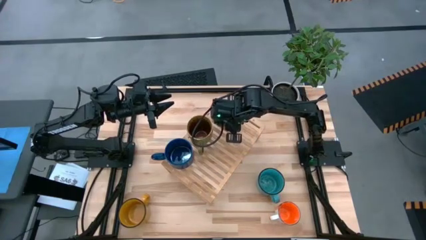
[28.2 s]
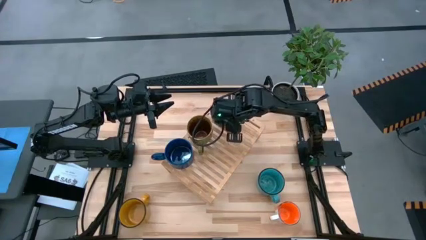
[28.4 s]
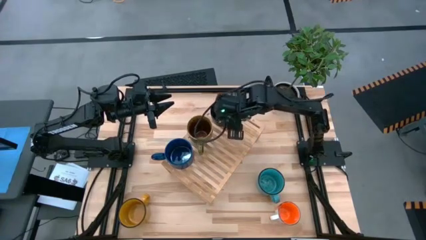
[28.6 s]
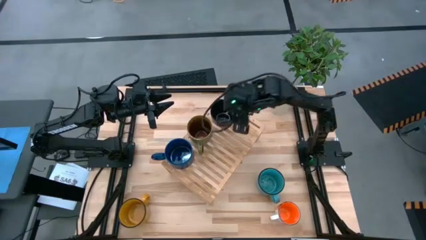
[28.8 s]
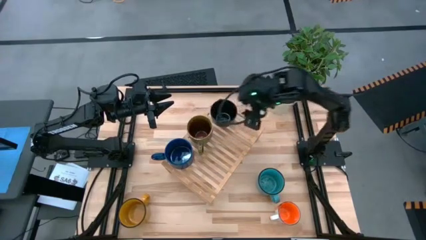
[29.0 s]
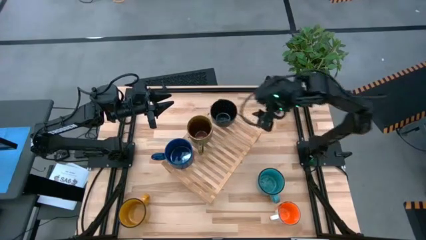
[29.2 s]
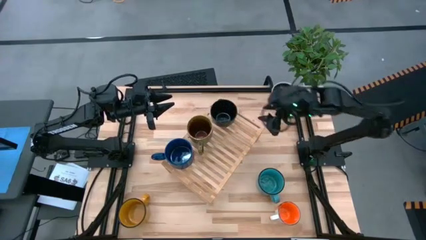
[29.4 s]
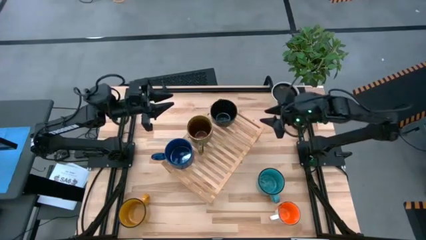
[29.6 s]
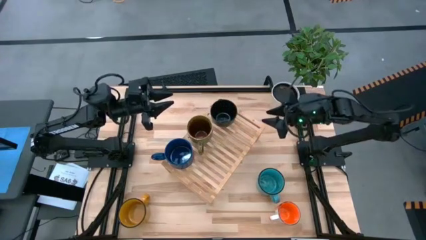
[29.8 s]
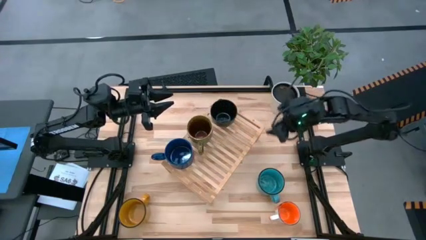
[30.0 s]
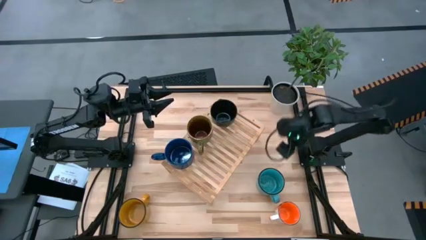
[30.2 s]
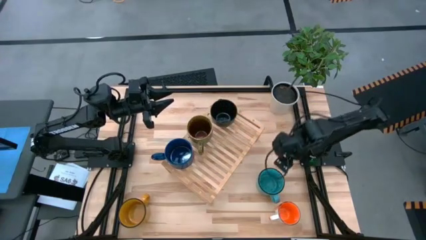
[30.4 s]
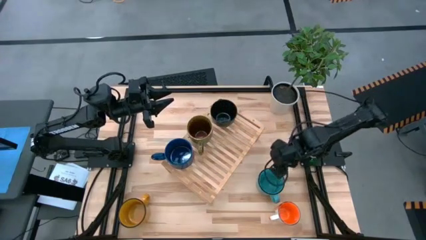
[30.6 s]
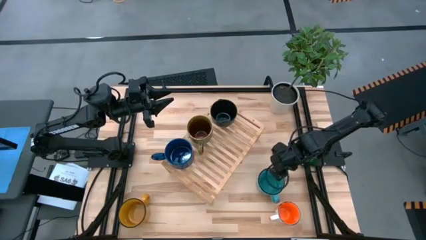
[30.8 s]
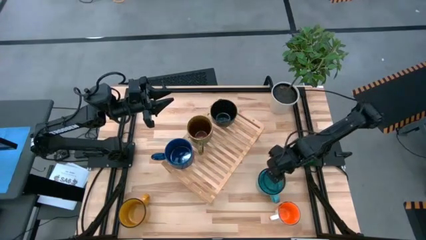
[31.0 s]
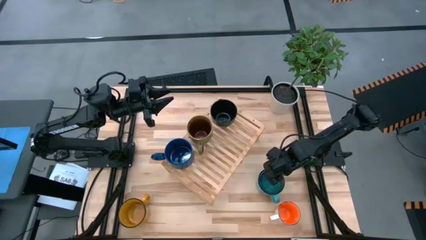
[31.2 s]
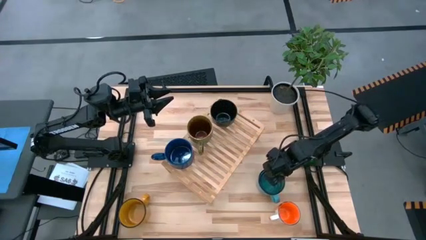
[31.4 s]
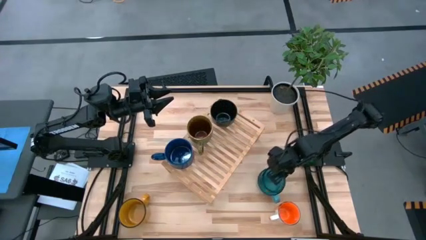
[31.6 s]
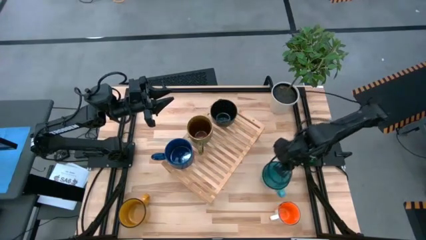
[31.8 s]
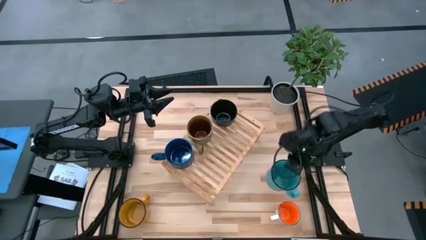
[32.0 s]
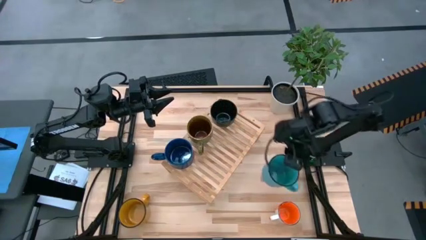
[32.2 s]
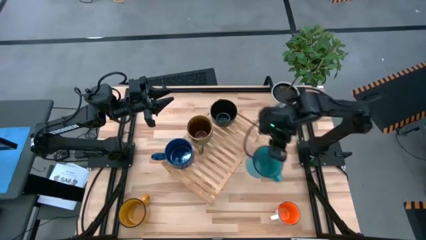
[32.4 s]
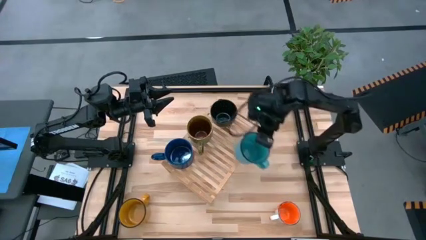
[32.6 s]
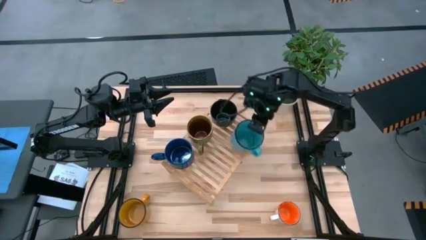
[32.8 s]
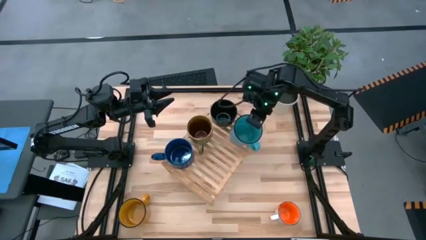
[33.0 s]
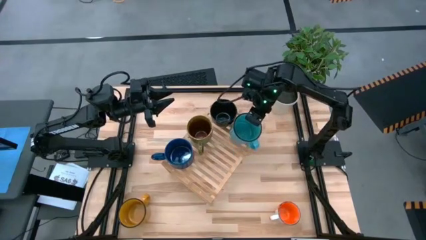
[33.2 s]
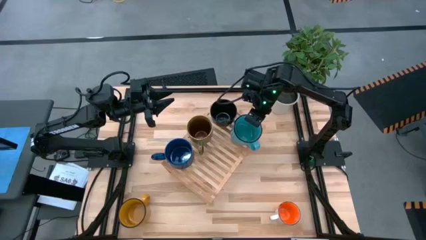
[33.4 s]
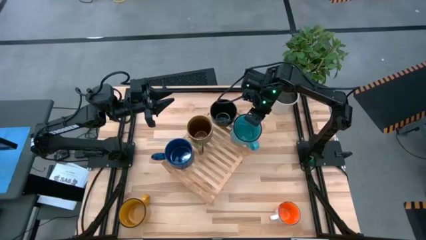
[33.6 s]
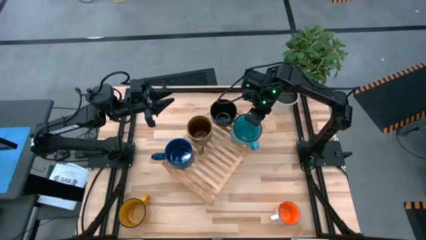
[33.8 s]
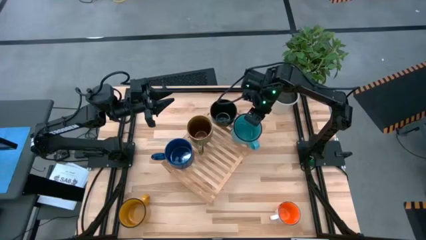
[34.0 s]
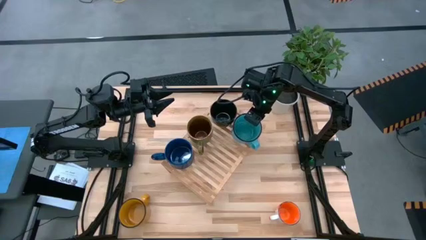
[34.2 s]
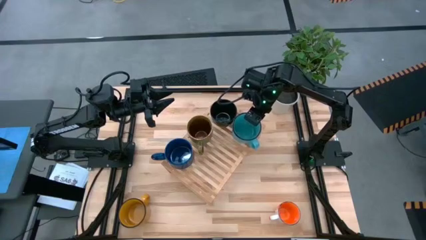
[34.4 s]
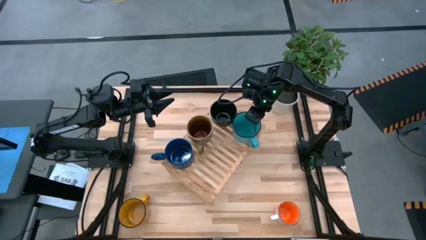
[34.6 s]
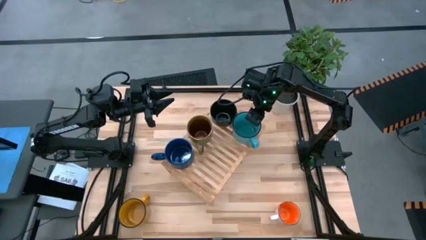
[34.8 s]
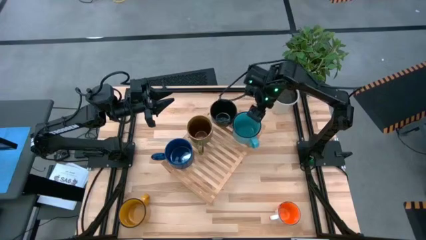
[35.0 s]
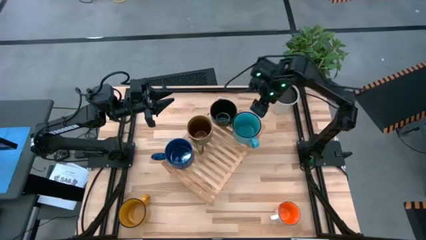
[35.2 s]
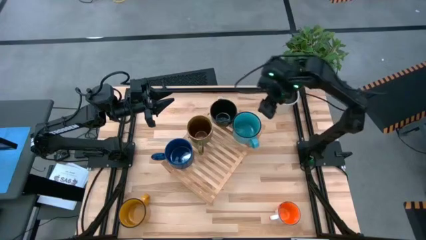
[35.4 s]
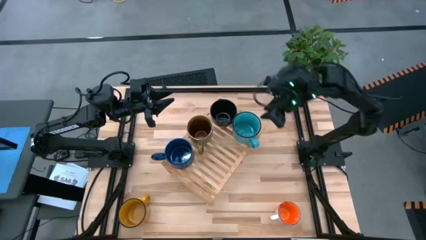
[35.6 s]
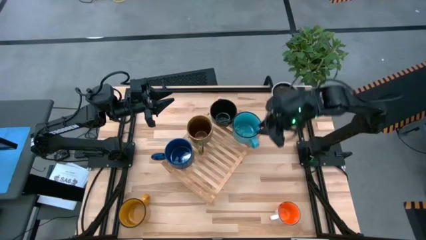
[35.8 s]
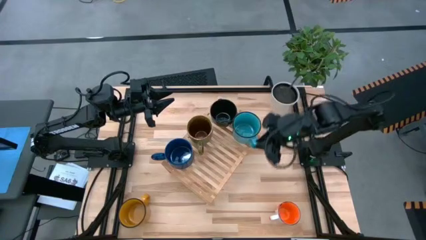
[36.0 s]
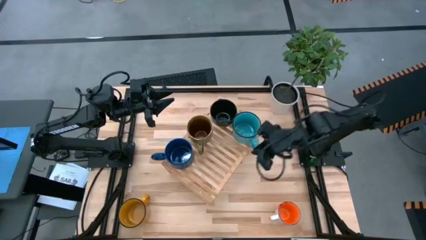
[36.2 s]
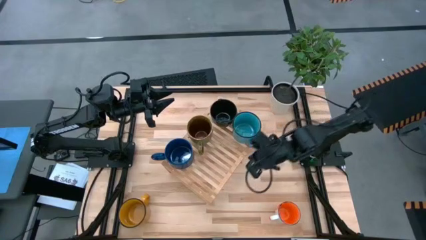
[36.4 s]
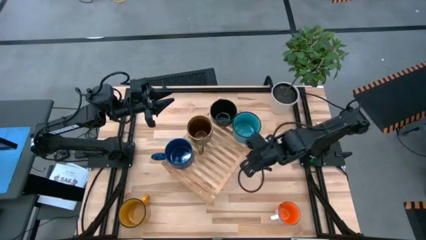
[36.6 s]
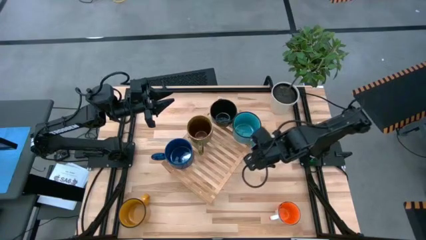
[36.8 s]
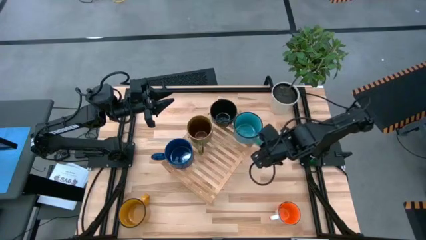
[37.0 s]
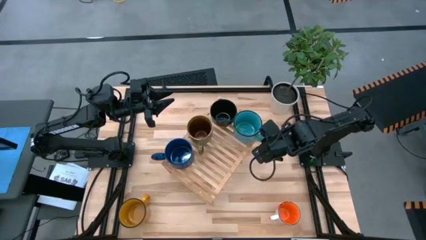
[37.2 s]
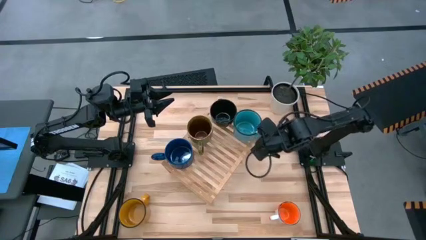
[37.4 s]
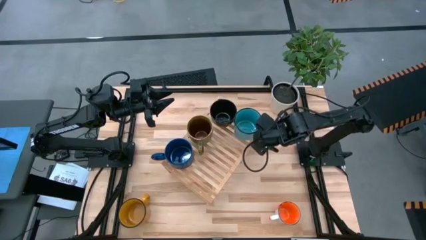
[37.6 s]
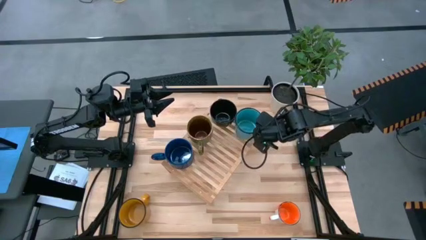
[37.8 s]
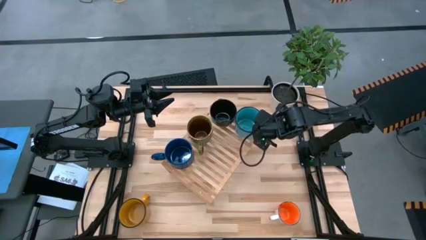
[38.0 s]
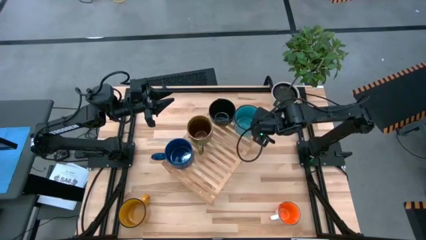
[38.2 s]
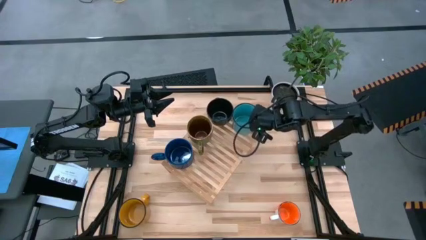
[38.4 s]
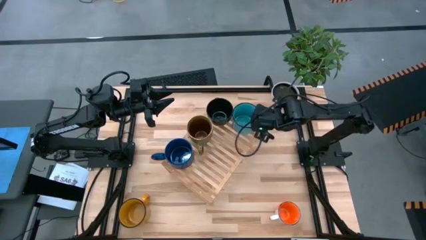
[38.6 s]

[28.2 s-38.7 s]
Task: Place coffee mugs
Put the light blue mug onto the shelf

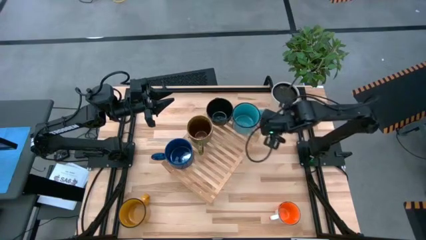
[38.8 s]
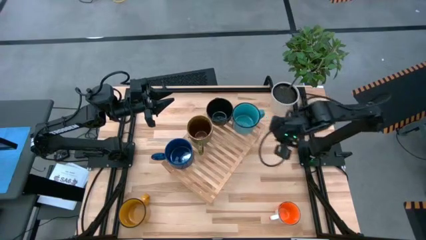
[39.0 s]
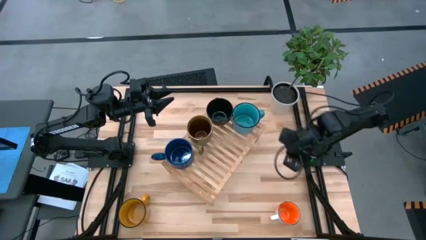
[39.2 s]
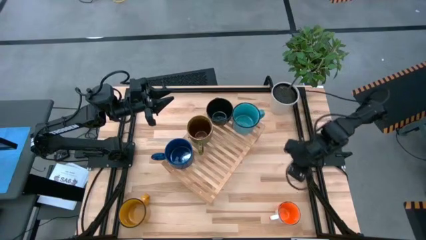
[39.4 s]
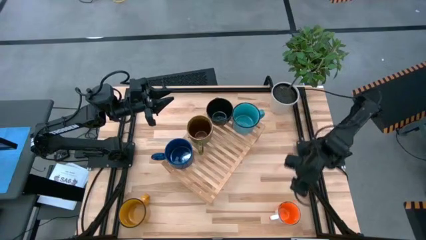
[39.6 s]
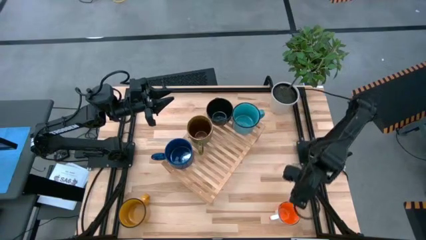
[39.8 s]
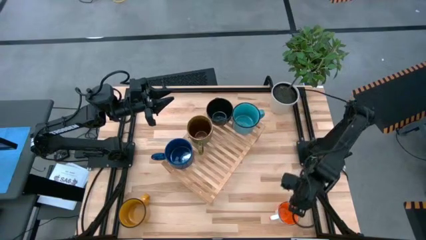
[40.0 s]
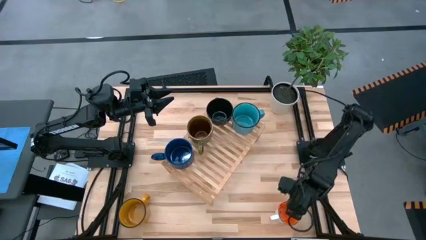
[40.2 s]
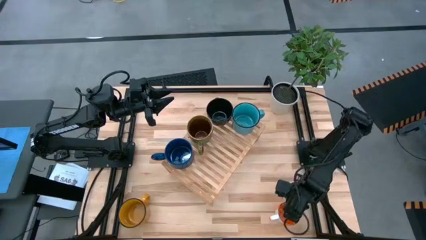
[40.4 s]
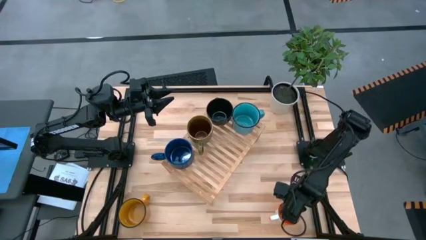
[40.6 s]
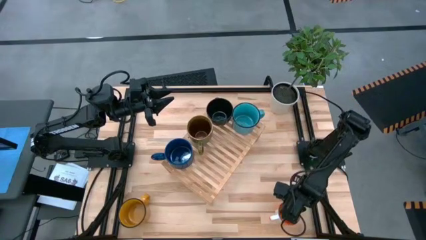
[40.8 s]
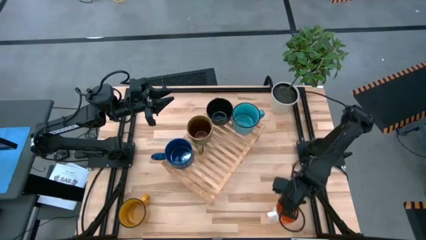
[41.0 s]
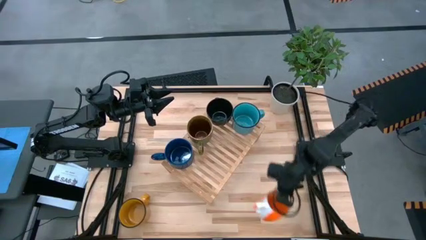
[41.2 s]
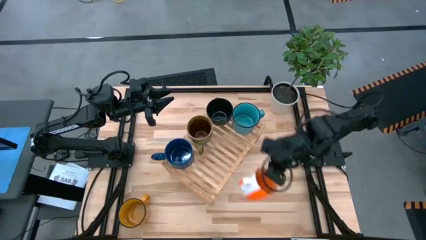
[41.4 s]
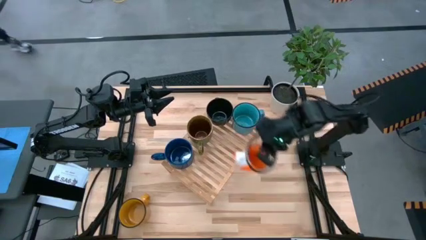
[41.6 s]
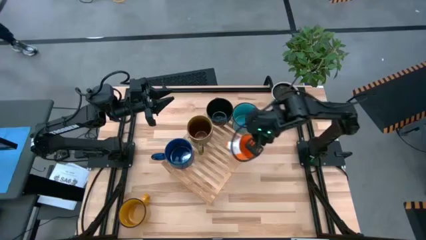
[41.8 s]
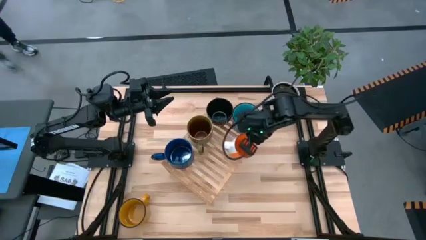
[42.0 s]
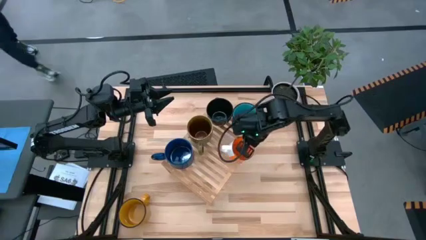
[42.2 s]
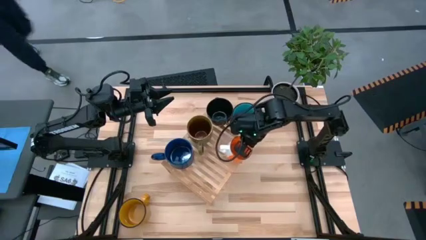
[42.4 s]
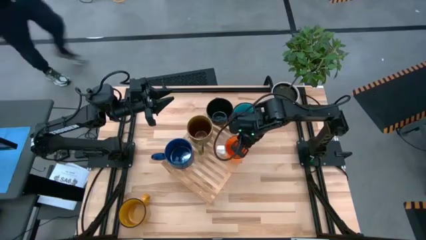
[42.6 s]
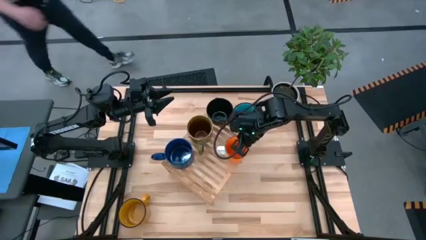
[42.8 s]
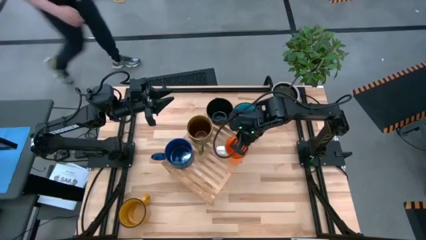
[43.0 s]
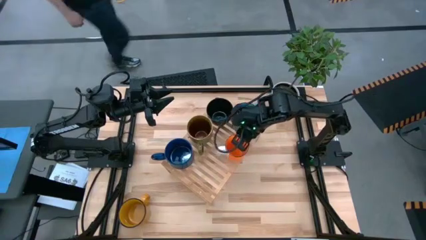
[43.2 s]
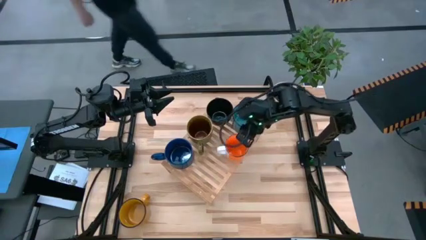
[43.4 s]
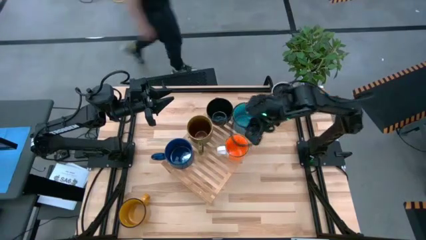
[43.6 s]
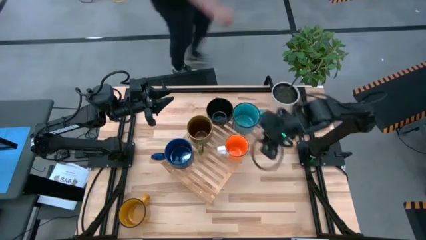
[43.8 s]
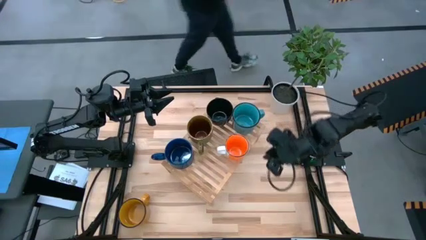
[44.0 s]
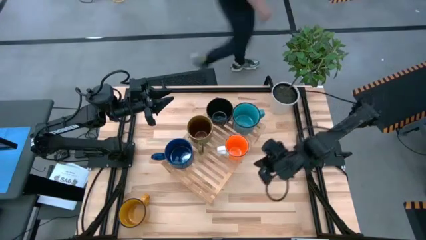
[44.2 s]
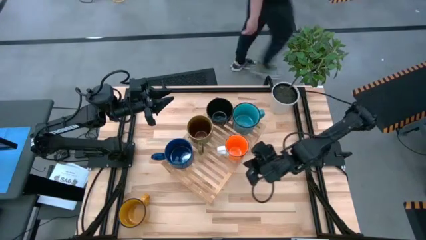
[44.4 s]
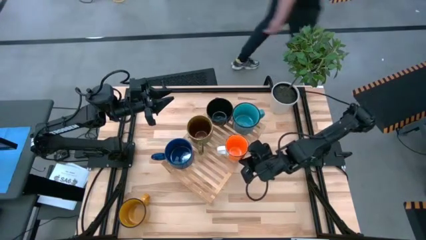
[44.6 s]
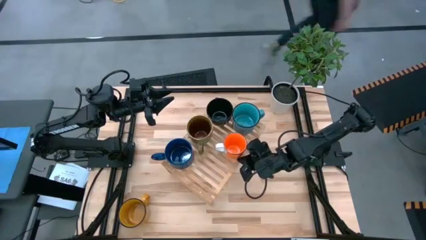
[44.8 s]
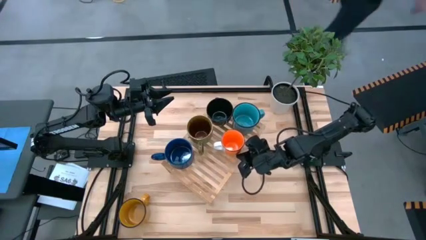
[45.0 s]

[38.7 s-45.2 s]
Put the orange mug on the shelf
